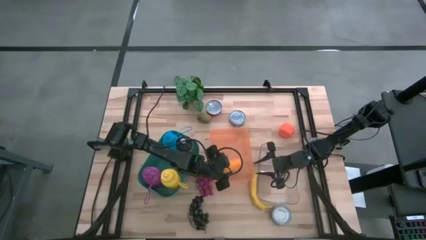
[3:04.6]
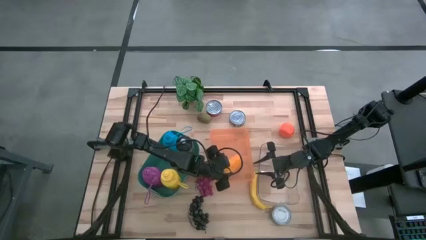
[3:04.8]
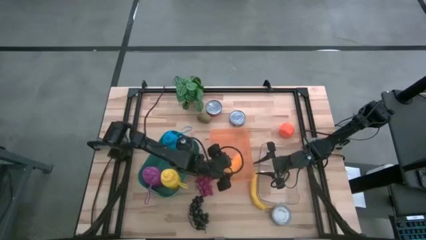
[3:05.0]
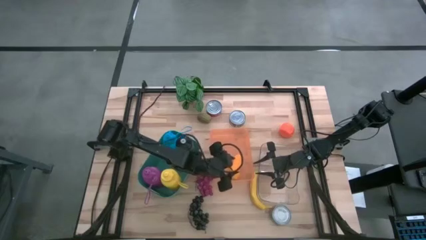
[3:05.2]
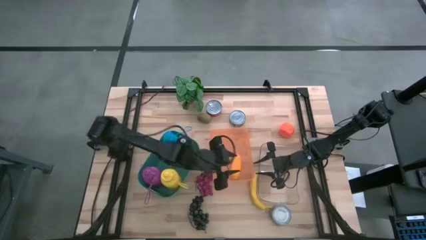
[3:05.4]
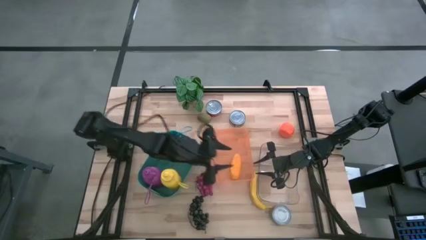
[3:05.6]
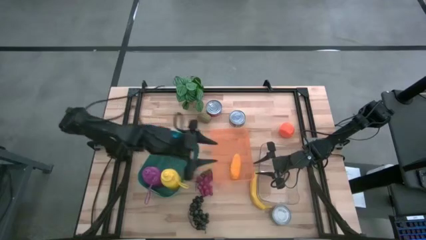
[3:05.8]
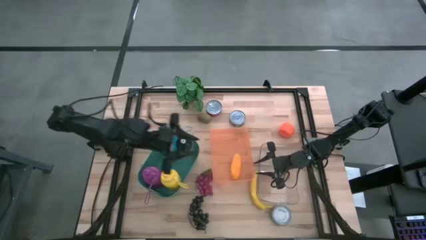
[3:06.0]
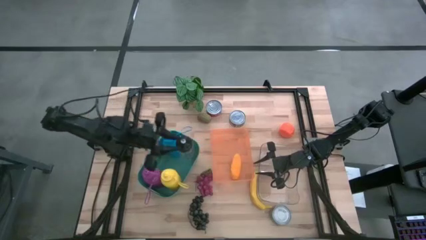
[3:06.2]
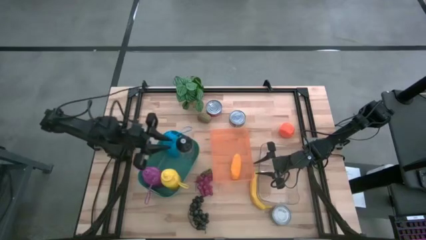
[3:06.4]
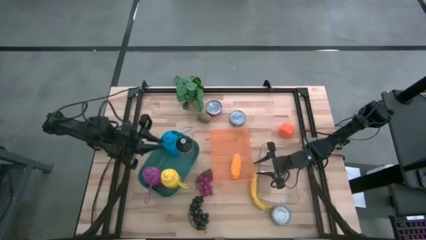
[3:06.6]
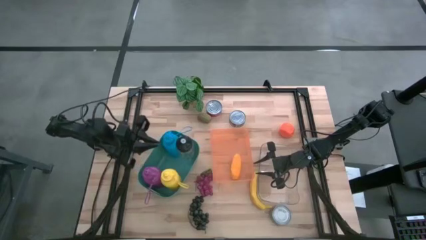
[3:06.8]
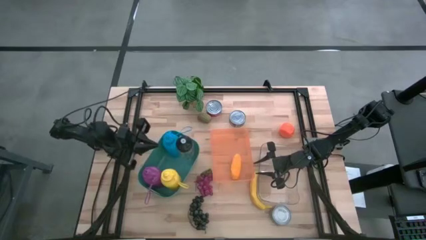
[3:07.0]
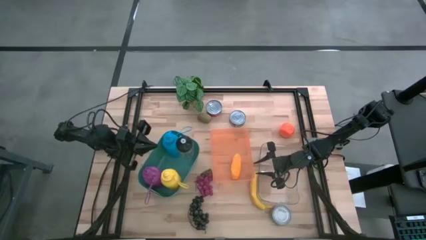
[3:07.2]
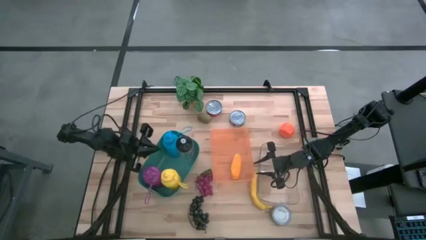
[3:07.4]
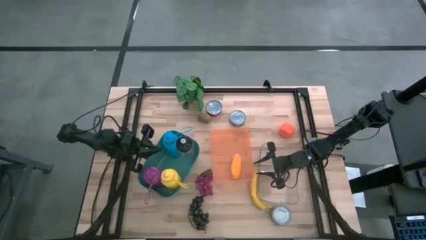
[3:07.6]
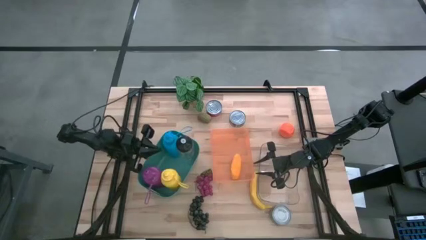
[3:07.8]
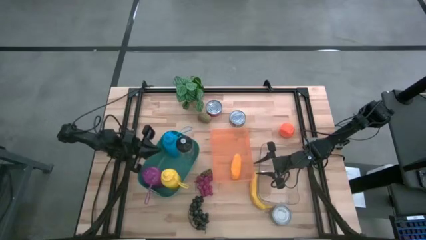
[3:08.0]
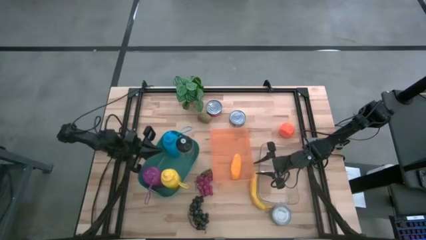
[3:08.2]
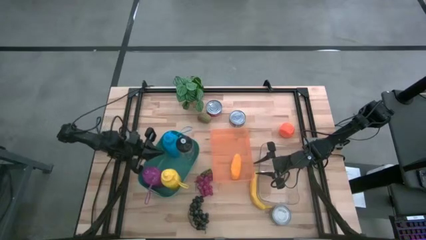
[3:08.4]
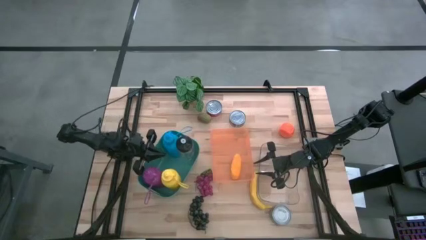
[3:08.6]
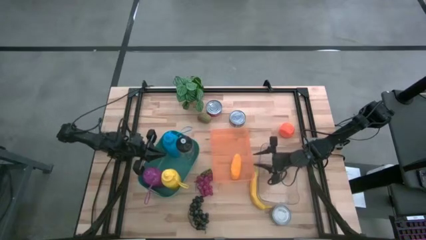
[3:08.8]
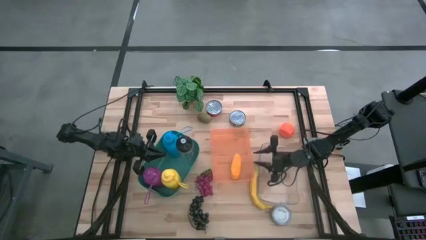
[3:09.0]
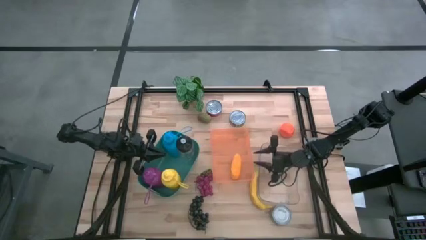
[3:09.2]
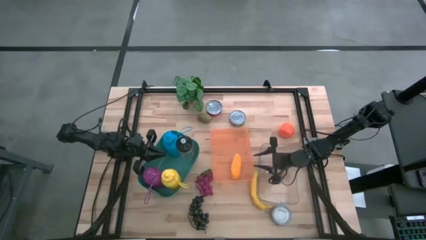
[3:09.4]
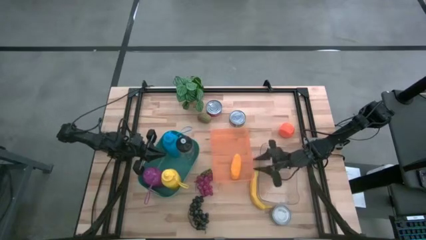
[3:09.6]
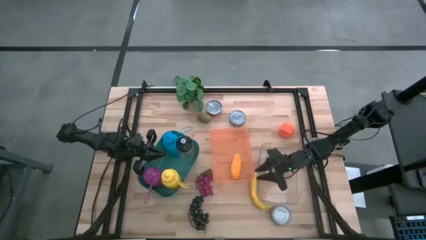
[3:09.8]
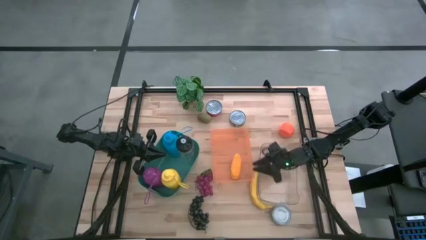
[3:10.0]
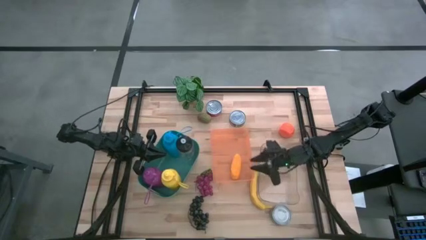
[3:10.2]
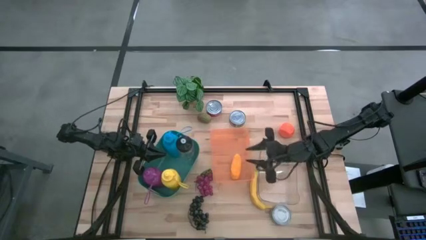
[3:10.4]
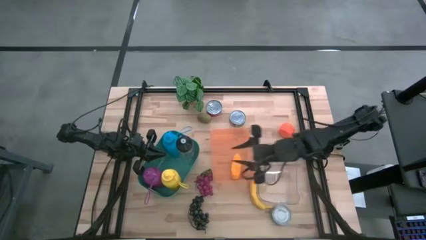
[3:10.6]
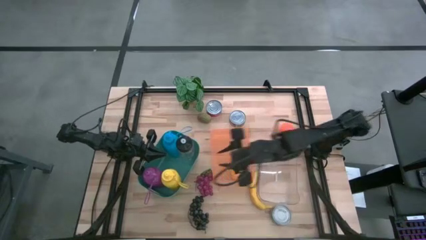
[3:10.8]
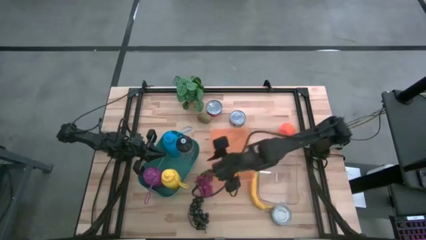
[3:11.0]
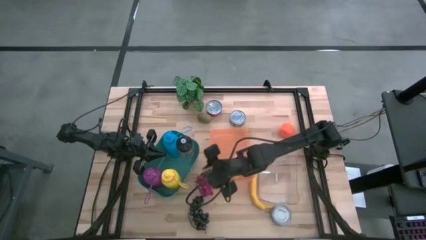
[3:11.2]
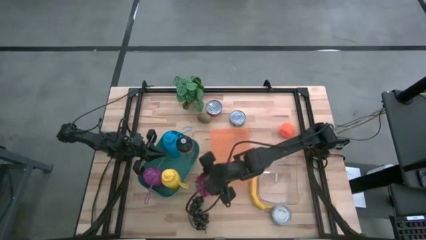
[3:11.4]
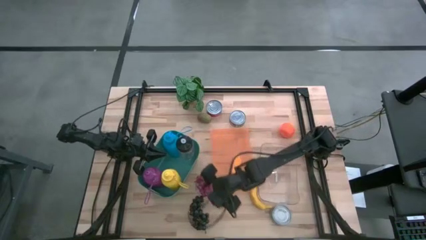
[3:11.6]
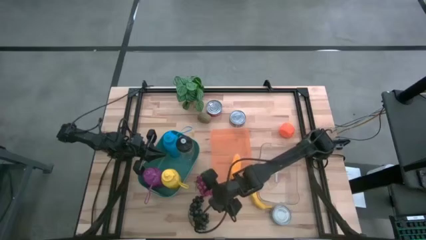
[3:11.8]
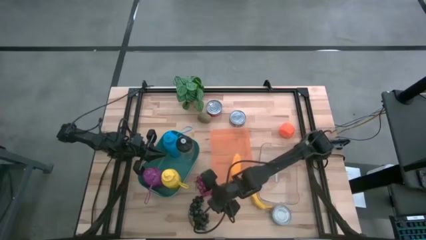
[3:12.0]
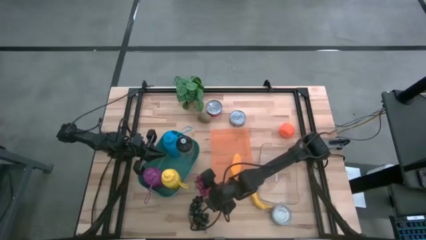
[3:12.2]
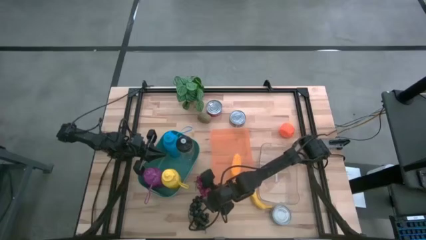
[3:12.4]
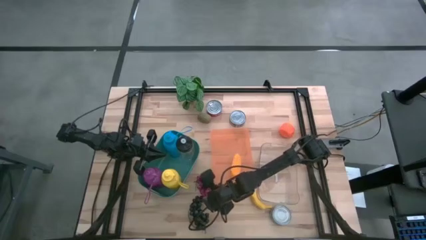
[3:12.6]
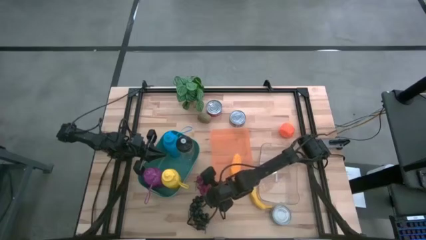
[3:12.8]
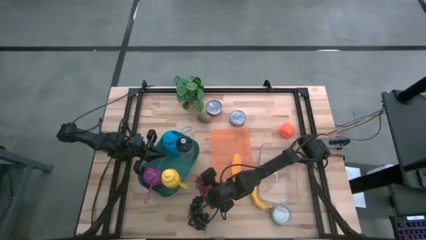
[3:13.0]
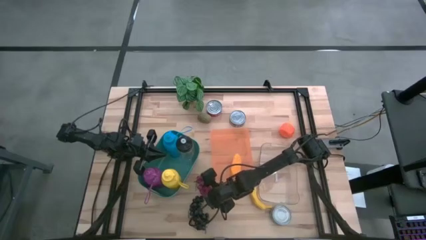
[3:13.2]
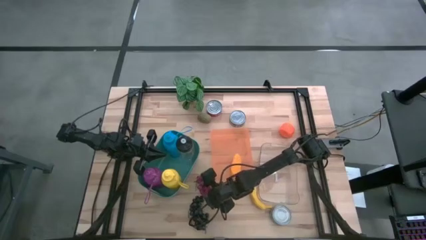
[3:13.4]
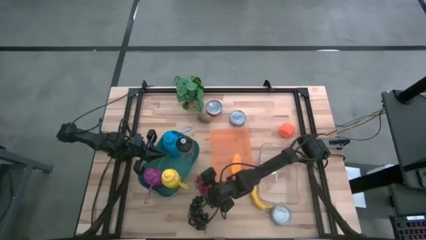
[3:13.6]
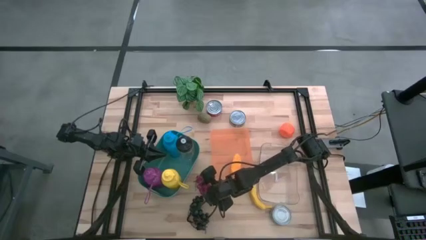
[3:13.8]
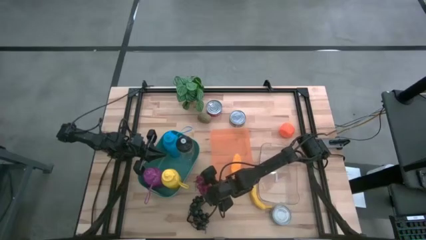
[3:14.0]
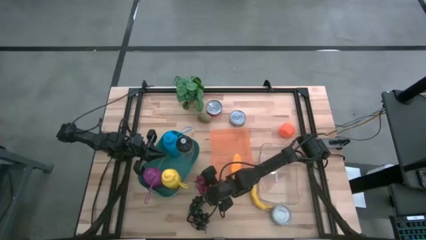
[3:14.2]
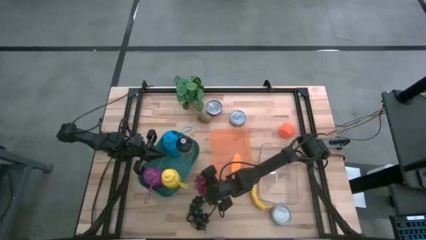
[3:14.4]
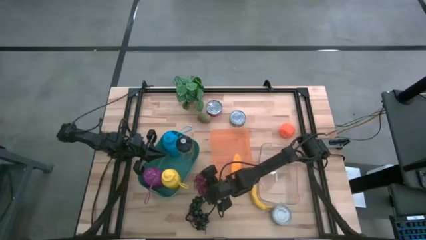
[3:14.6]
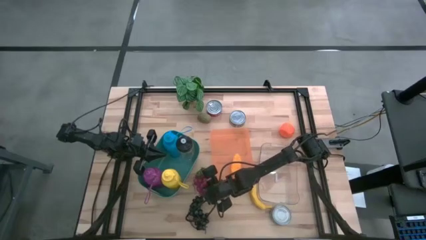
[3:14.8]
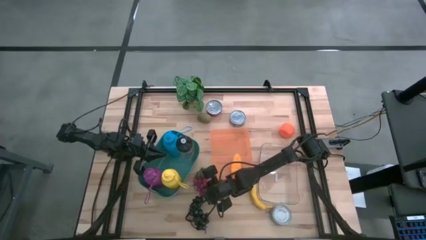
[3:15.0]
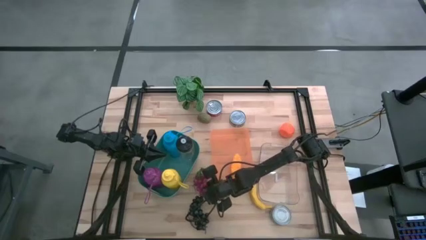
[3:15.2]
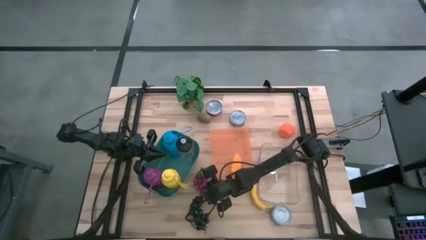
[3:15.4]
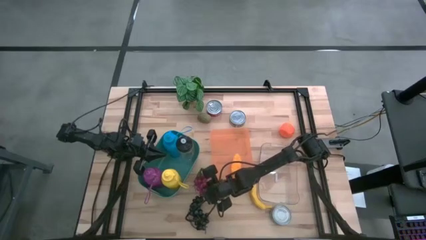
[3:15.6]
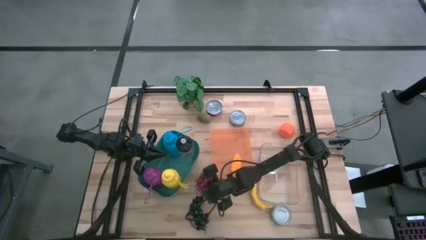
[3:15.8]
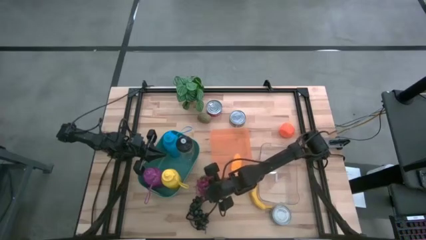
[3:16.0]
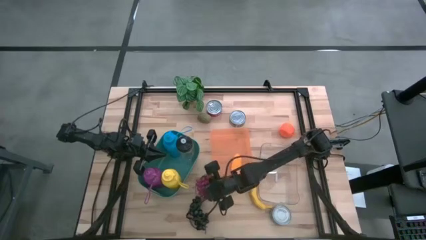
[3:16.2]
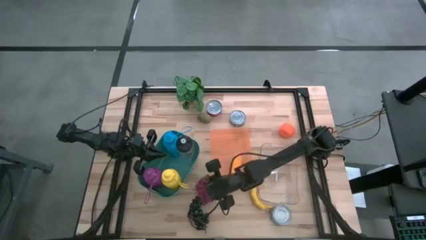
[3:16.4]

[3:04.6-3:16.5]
Task: Pick & Place Food Item
Put the purple grapes into the orange bin

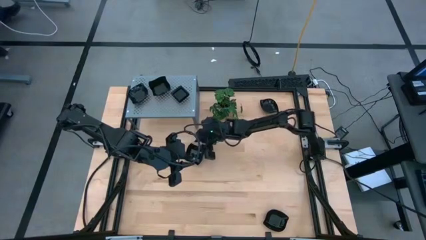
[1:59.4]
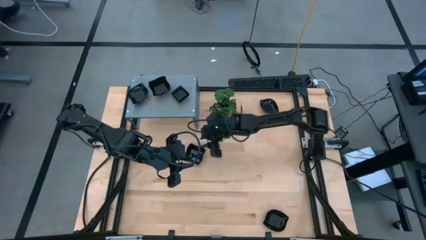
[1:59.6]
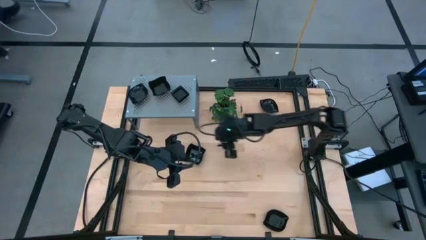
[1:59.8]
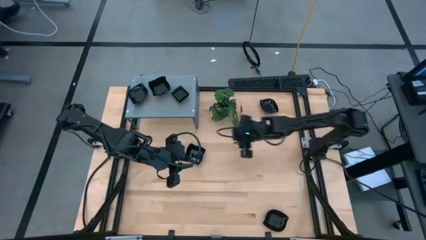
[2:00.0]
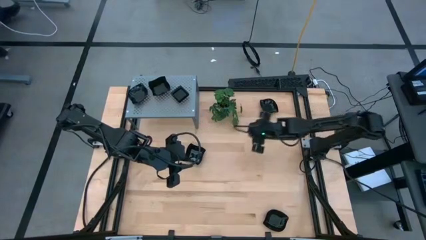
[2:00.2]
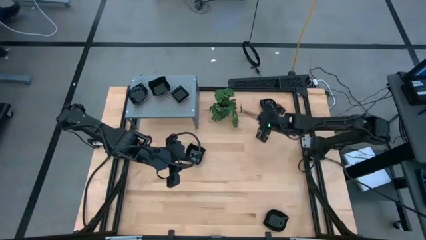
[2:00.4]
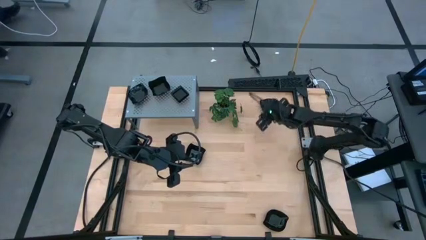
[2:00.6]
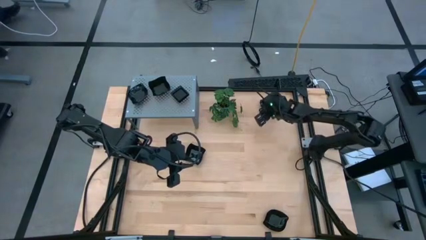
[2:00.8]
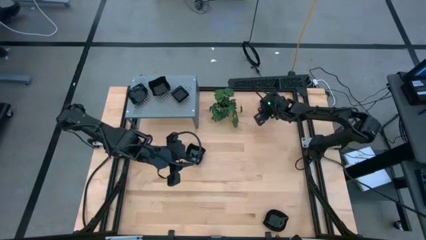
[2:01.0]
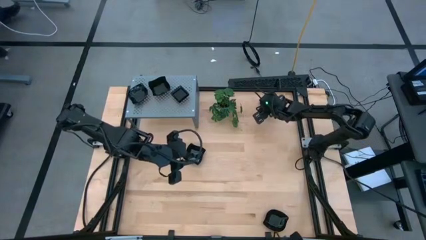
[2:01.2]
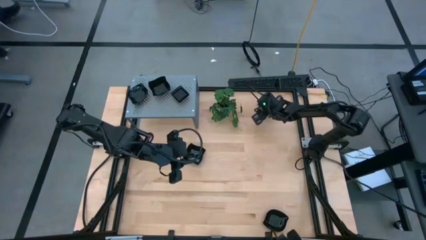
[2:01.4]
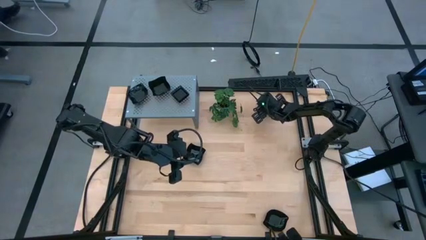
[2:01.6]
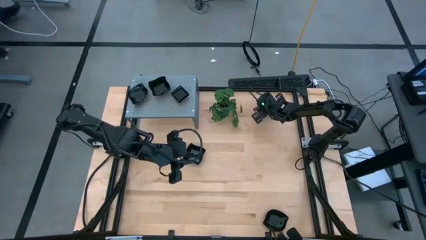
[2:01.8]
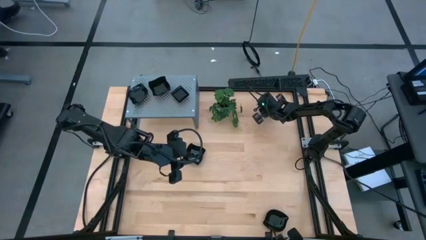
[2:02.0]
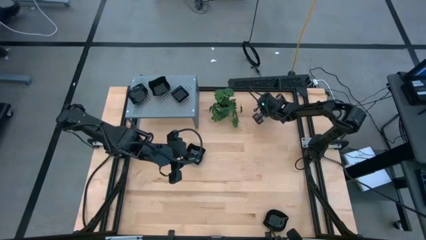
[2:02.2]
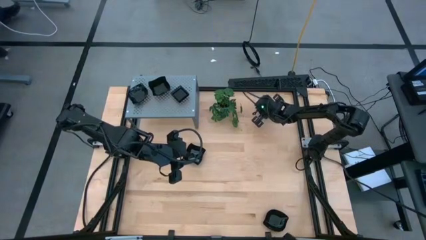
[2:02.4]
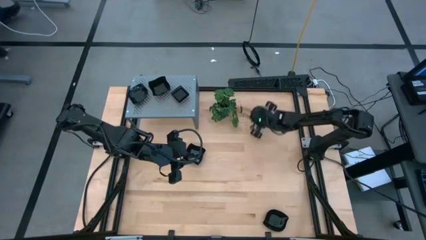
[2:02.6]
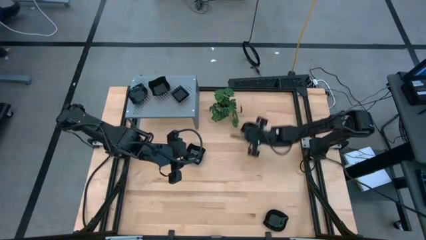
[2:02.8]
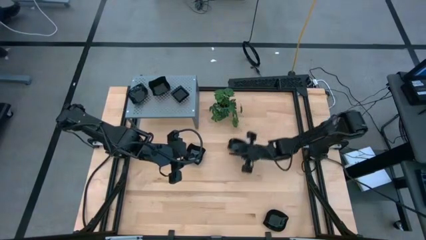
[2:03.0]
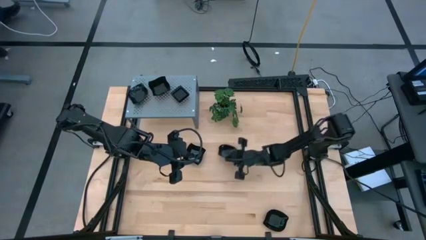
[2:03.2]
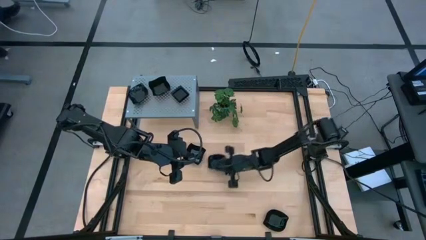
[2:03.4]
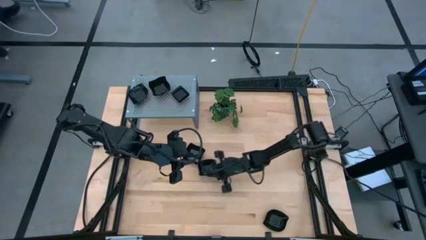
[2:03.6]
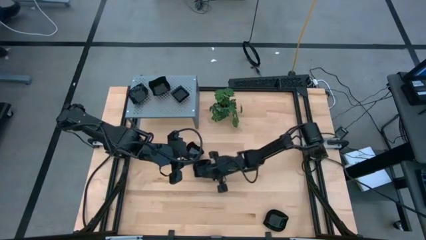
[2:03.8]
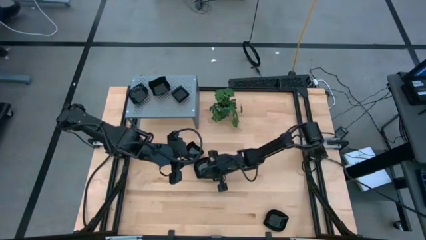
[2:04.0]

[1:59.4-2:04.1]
Task: Pick & Place Mini shaped plates
Move the black leaf shaped plate to the center of the table
